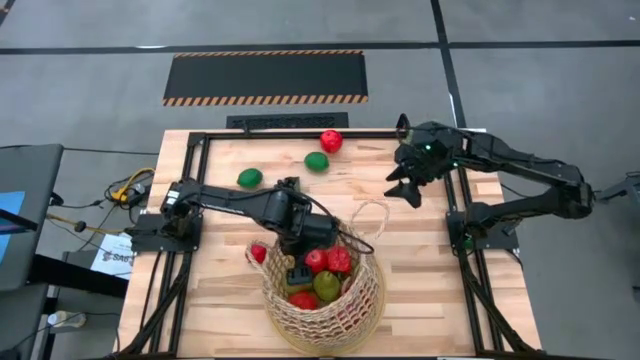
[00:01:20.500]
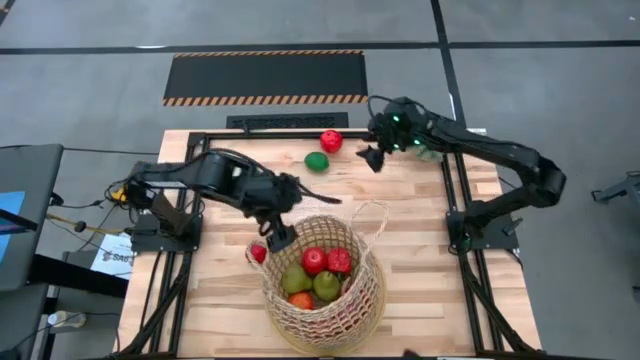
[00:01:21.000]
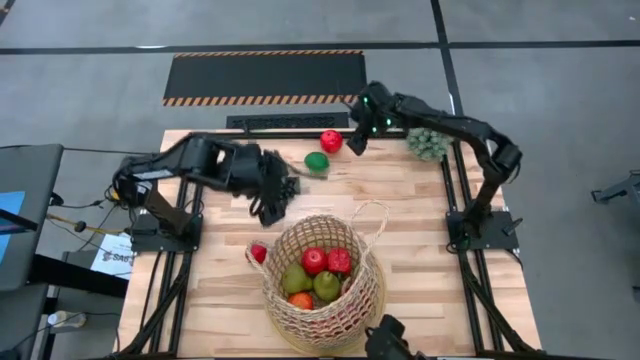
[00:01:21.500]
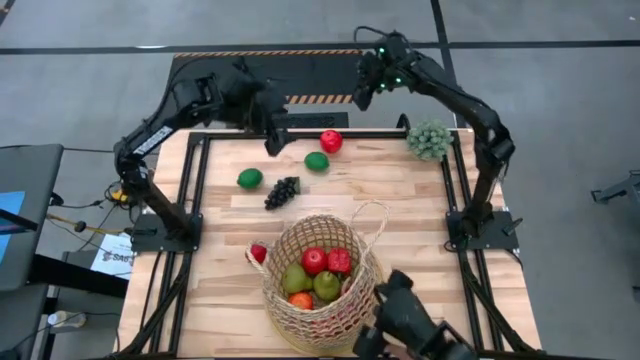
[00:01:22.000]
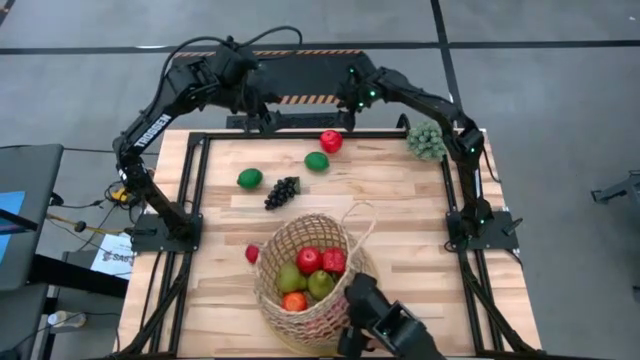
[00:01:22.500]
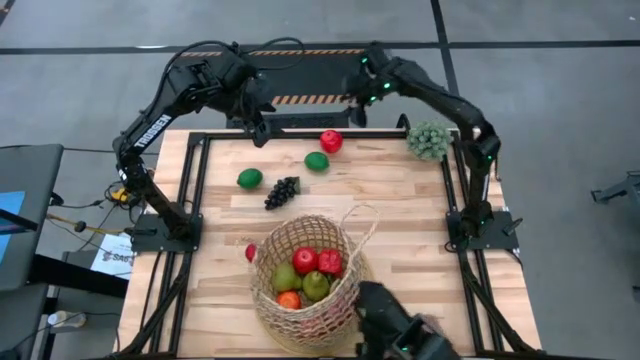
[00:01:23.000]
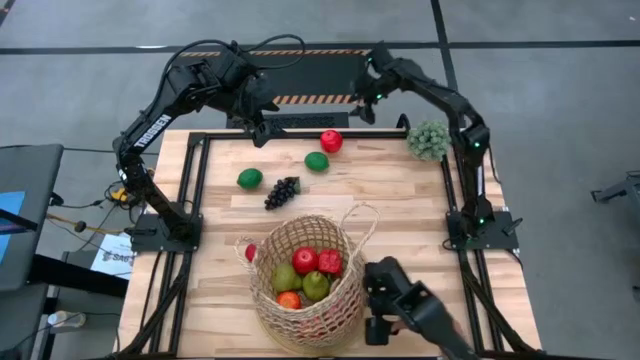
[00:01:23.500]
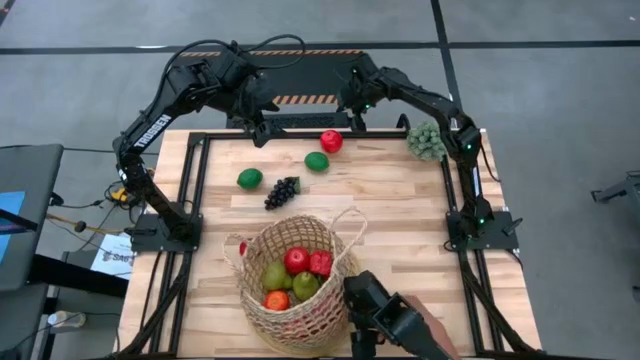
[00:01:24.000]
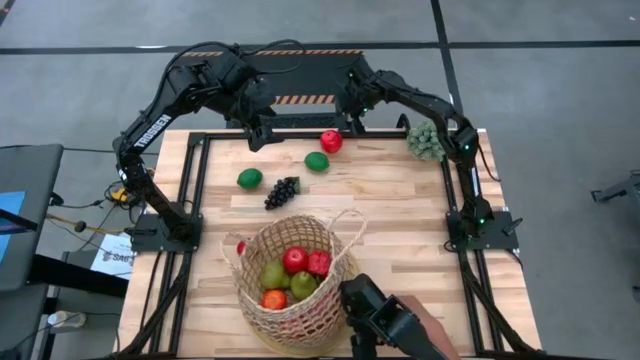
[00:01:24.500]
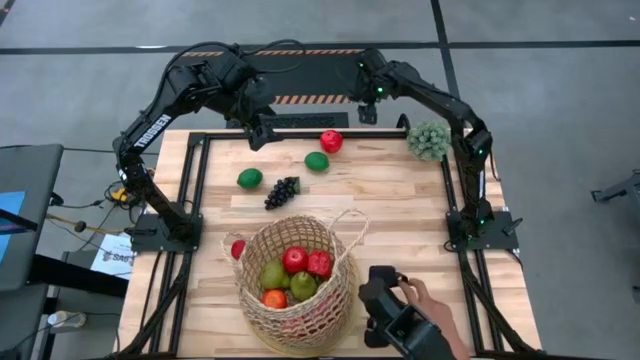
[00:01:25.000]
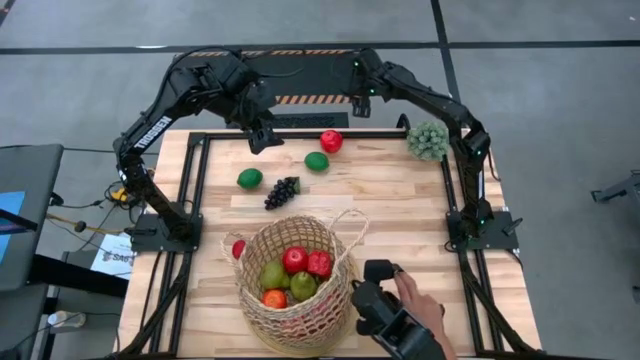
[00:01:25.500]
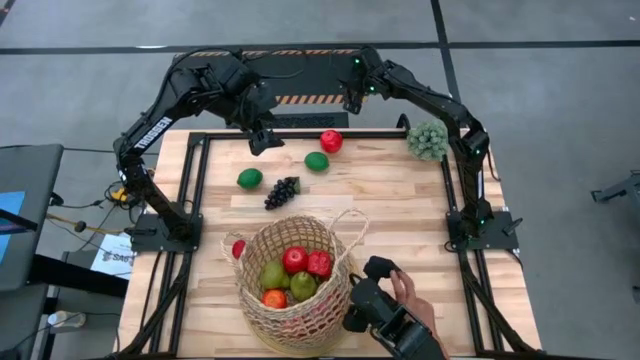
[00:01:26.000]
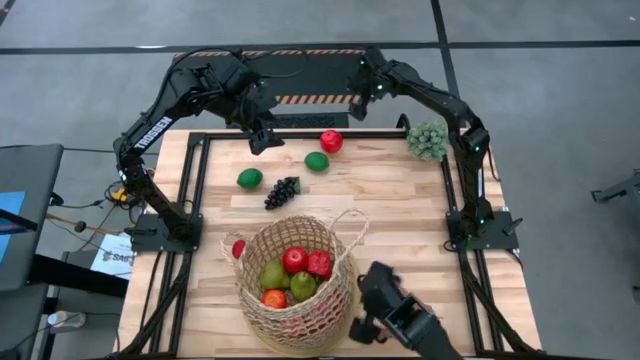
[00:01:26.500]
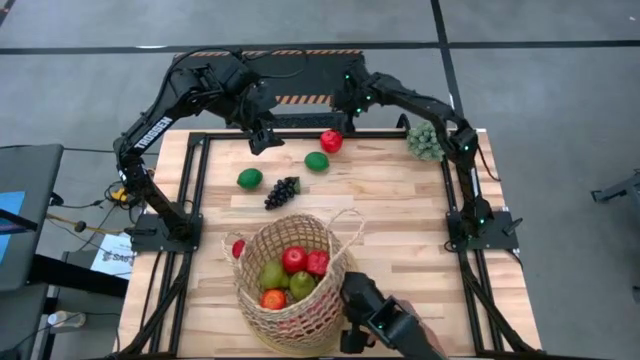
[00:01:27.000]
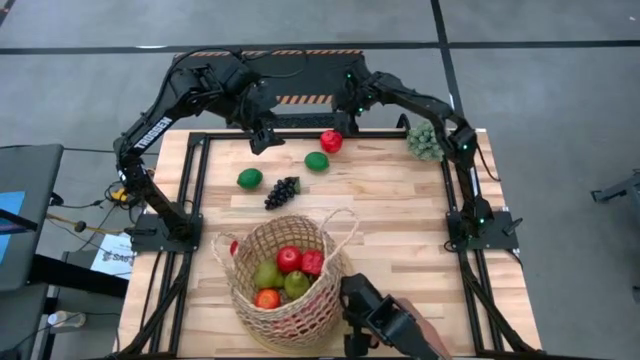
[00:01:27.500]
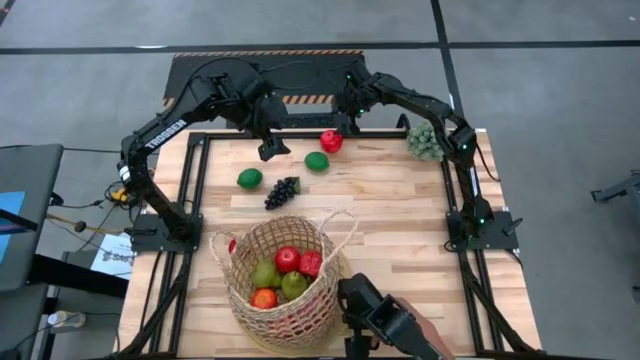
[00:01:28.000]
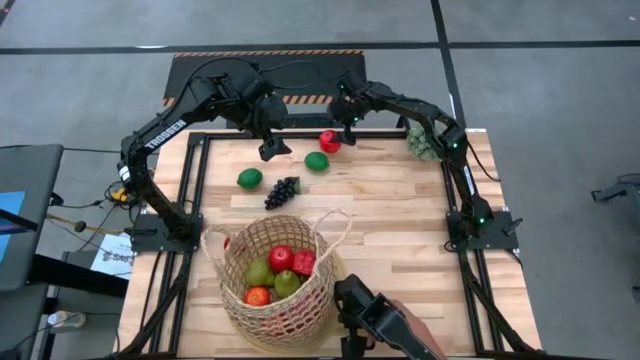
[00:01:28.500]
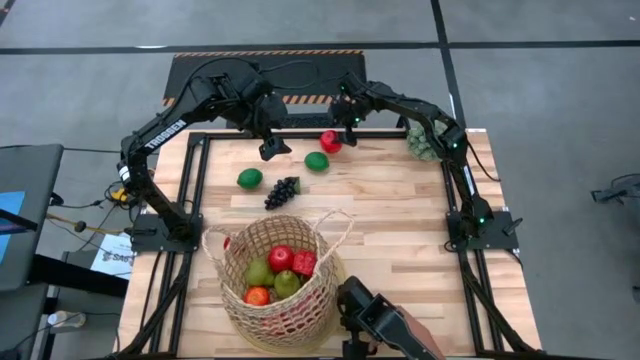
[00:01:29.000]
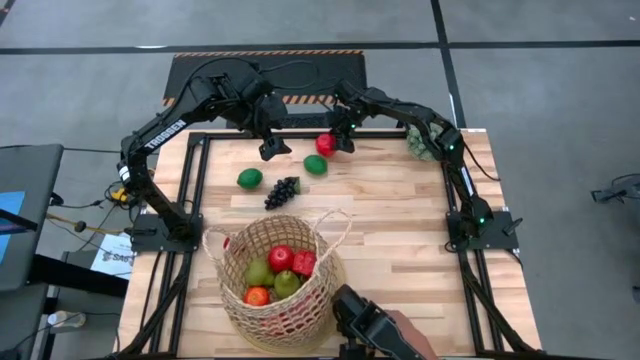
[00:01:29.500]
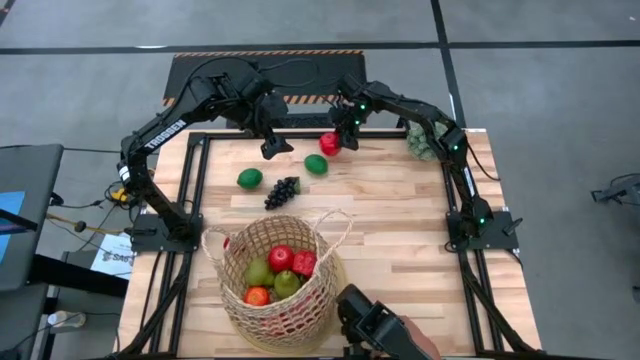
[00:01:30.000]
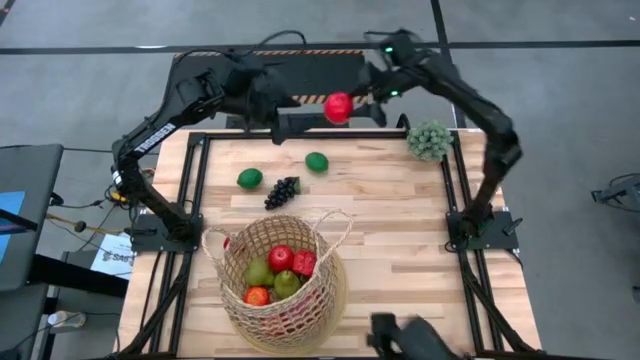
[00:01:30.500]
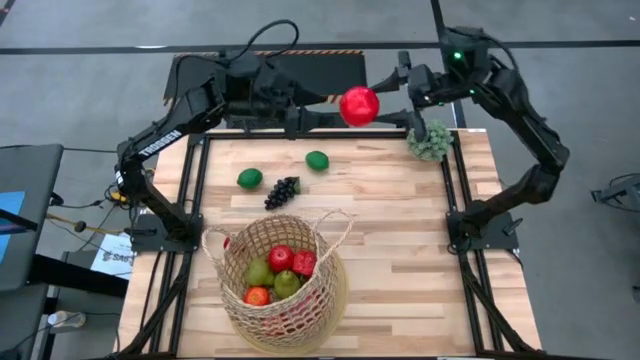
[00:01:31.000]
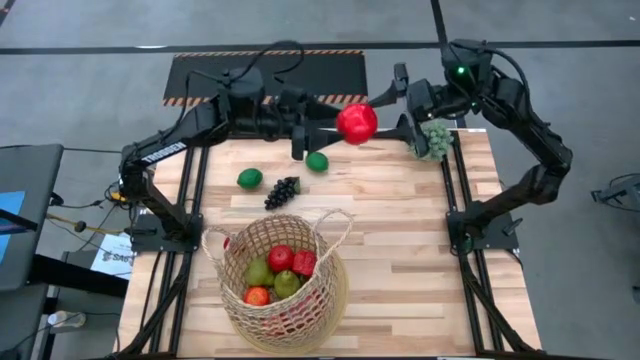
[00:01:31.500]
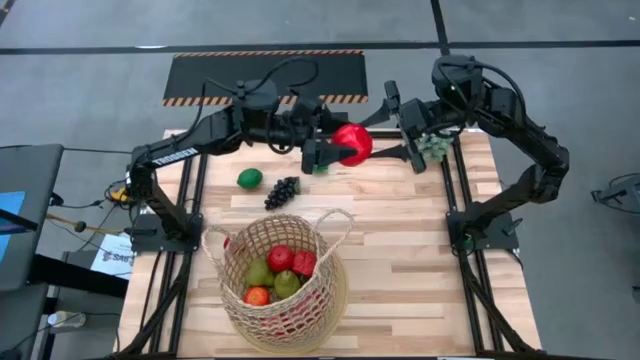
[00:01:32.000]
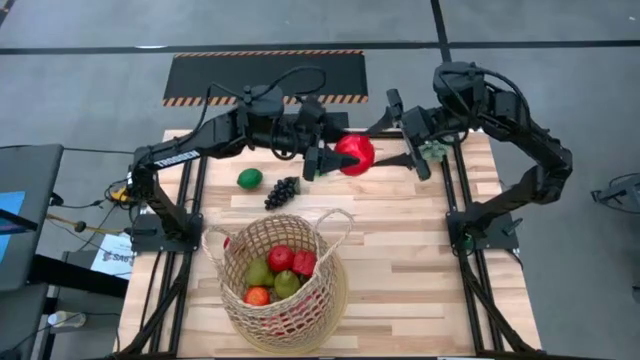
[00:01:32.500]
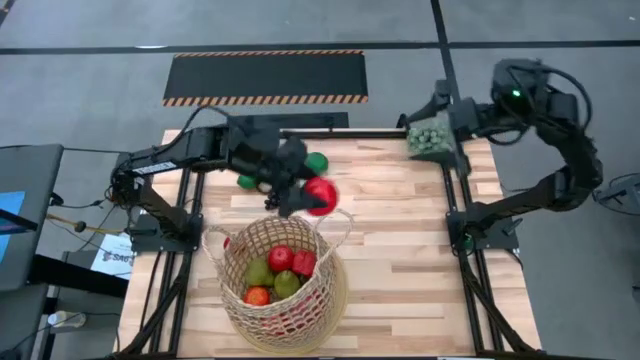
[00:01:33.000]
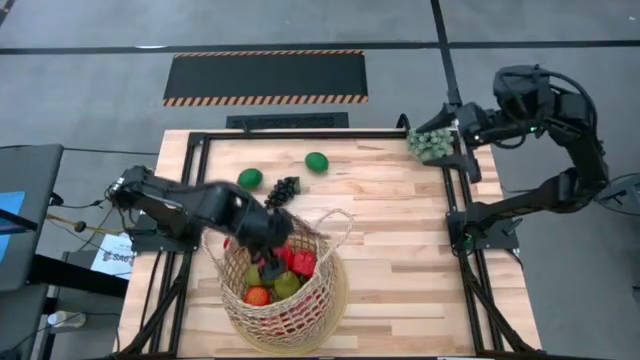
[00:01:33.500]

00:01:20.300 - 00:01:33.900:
Task: Build produce basket
Put the apple into the basket

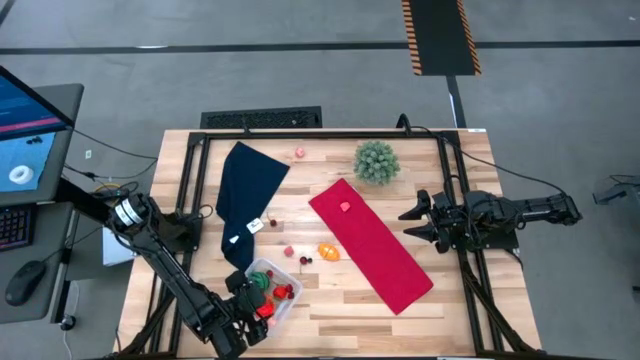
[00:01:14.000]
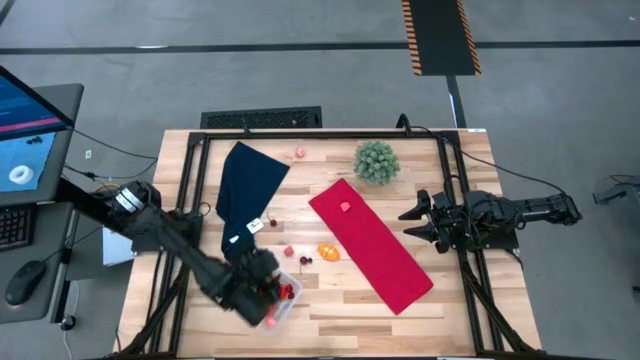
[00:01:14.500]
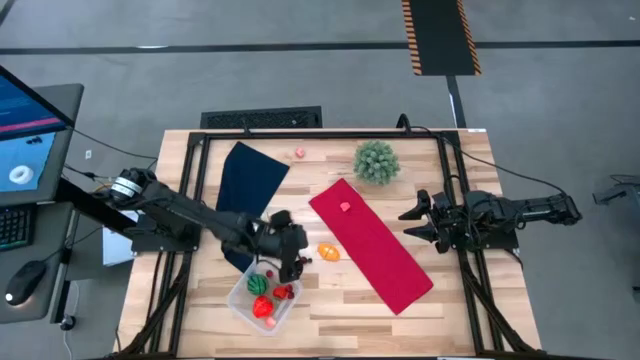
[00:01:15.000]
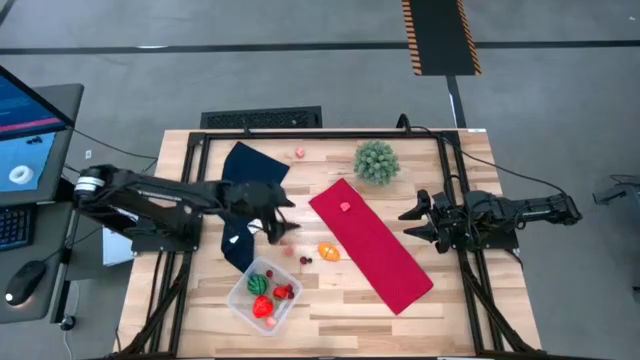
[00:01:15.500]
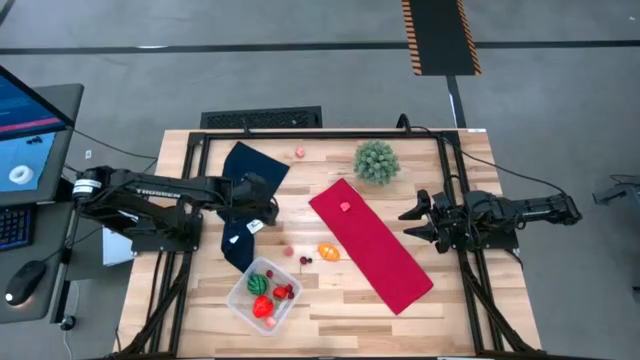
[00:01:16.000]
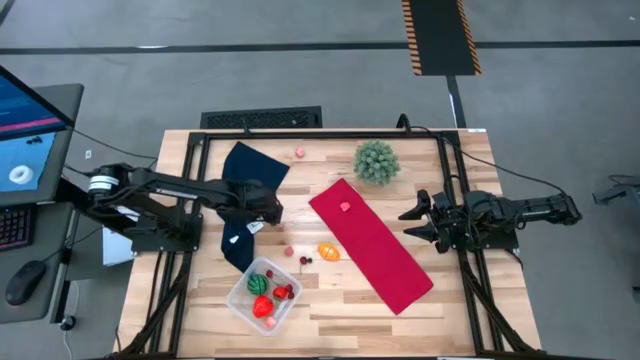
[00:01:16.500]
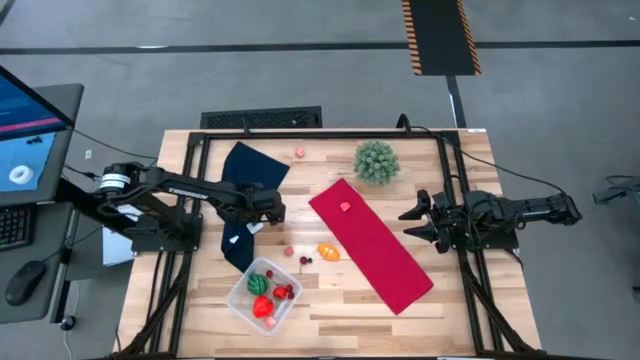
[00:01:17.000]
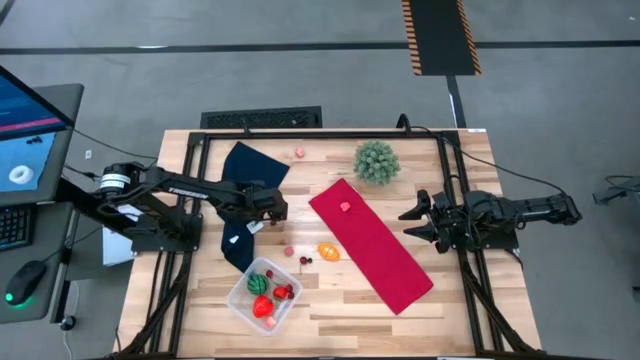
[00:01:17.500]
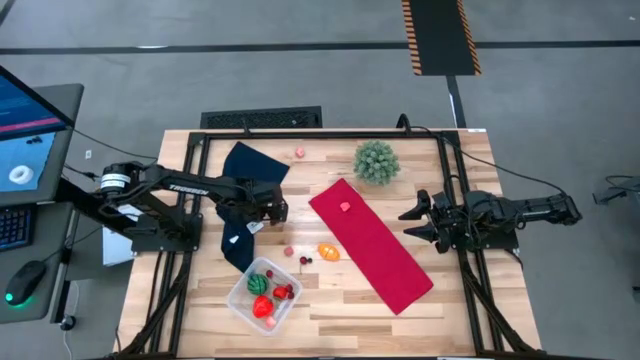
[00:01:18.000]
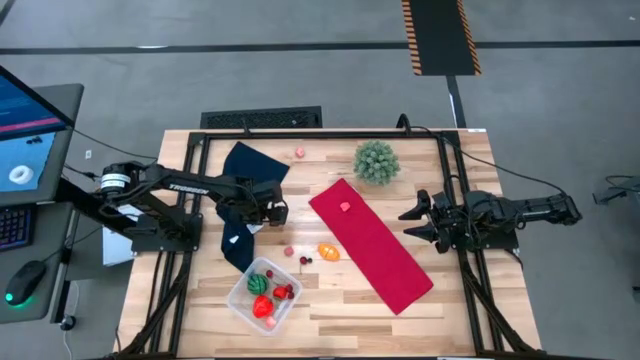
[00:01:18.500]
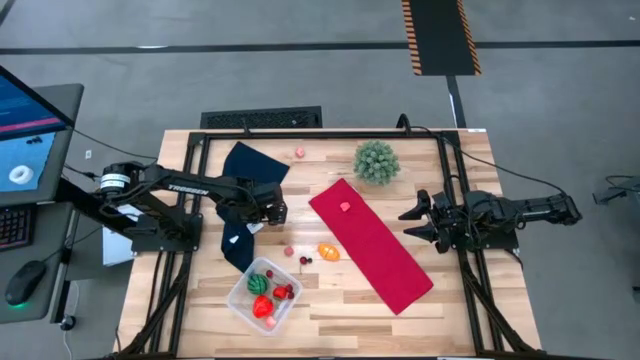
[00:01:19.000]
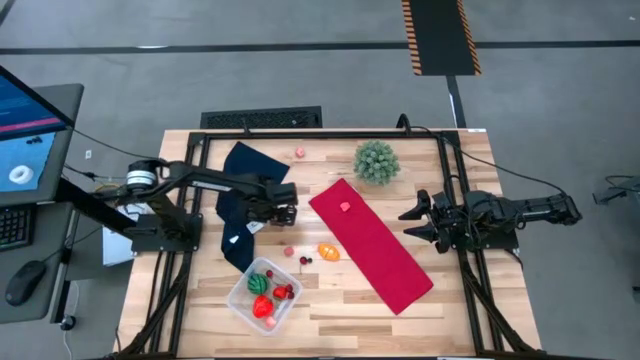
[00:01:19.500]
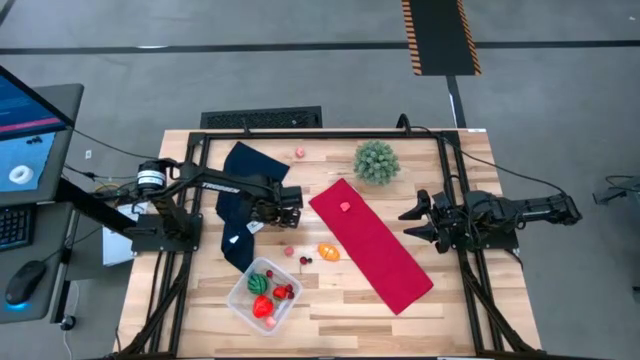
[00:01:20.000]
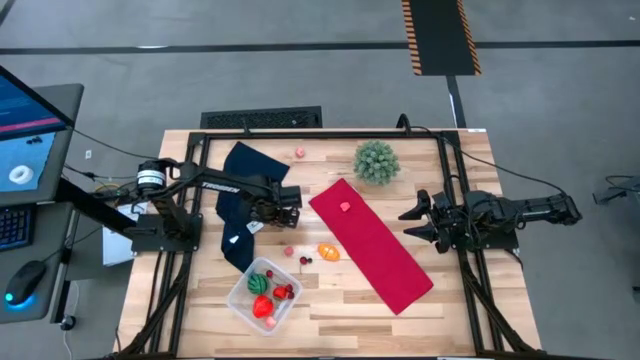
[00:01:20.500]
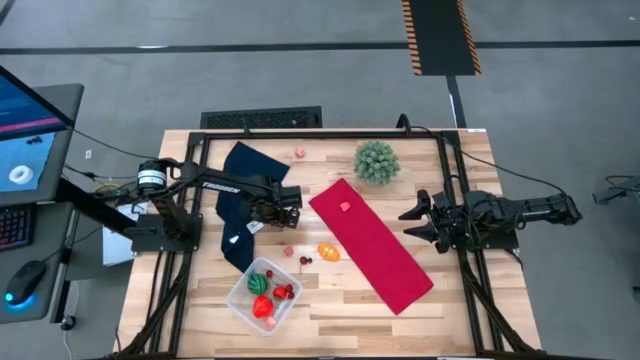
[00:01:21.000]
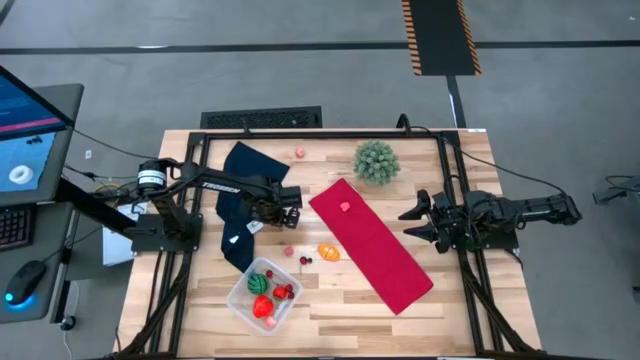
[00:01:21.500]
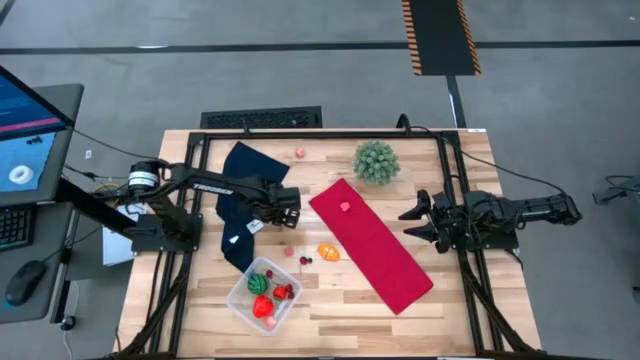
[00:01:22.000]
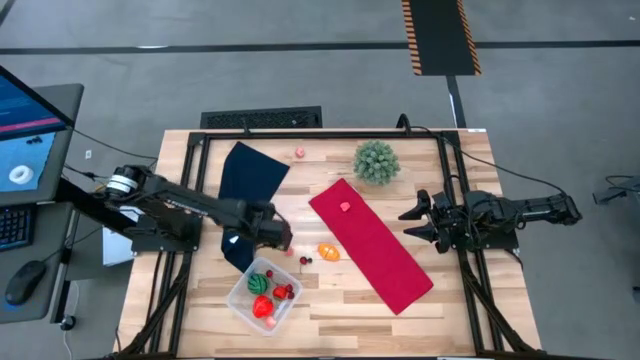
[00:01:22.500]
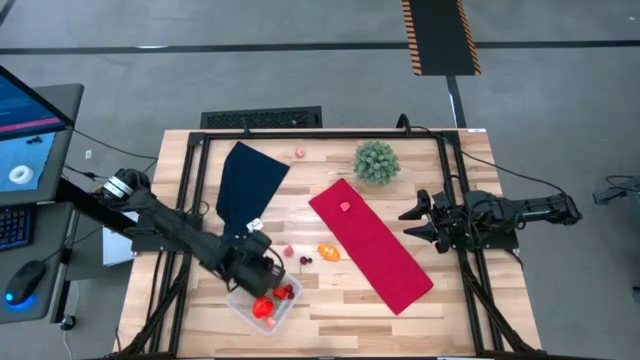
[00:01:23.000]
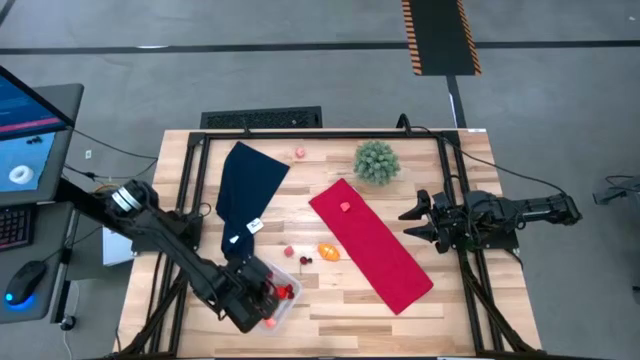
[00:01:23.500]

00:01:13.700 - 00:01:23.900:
Task: Pick and placing Produce into tupperware
Put the cherry into the transparent bin
